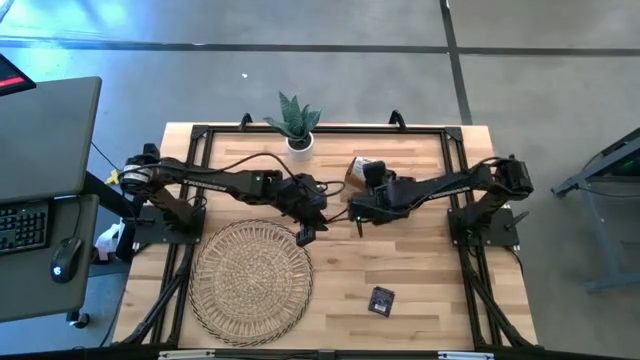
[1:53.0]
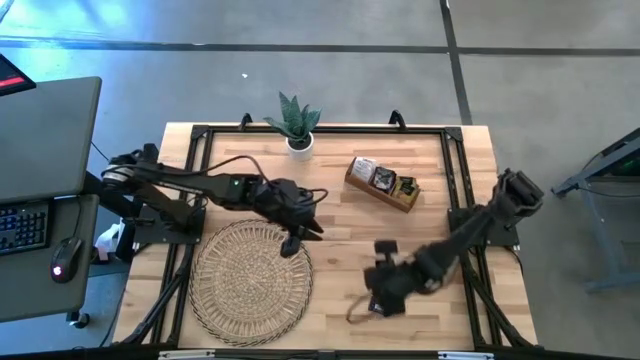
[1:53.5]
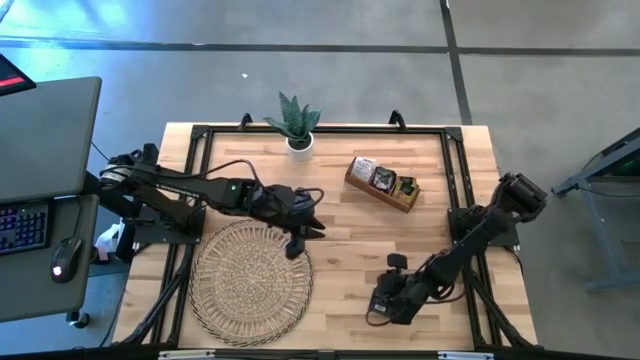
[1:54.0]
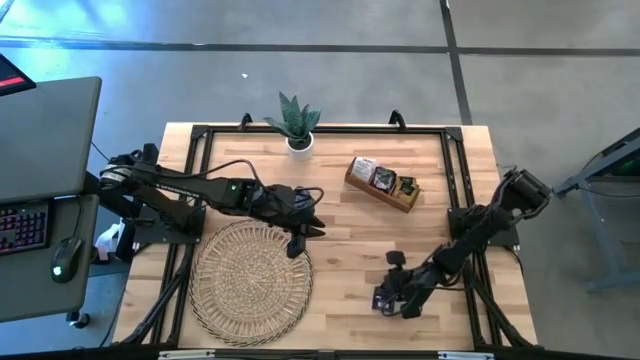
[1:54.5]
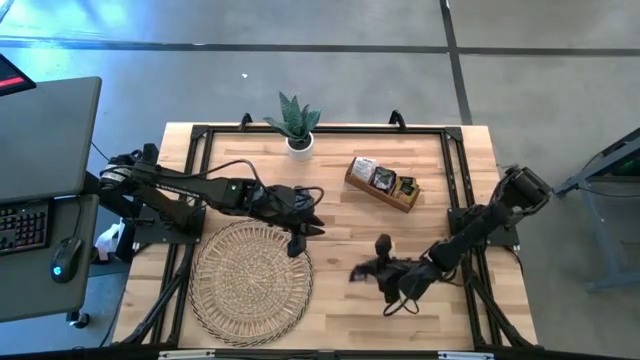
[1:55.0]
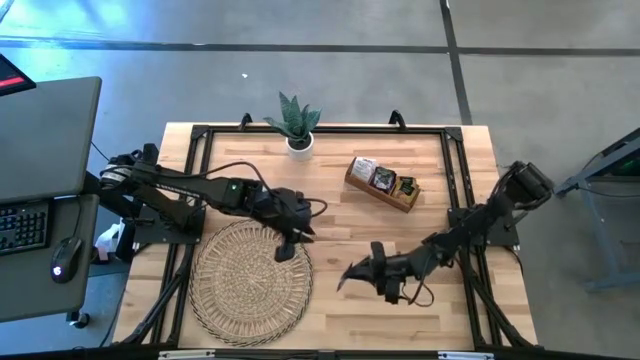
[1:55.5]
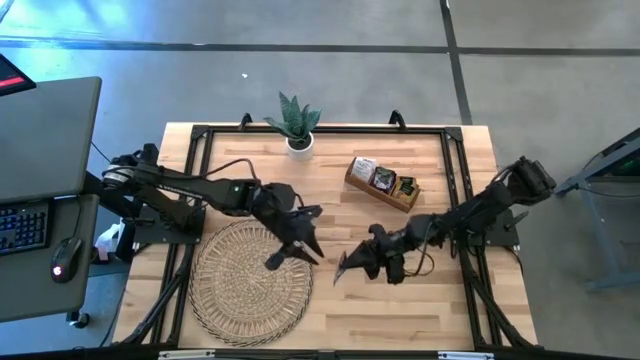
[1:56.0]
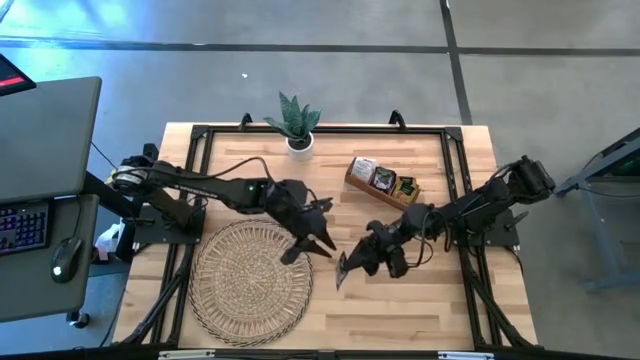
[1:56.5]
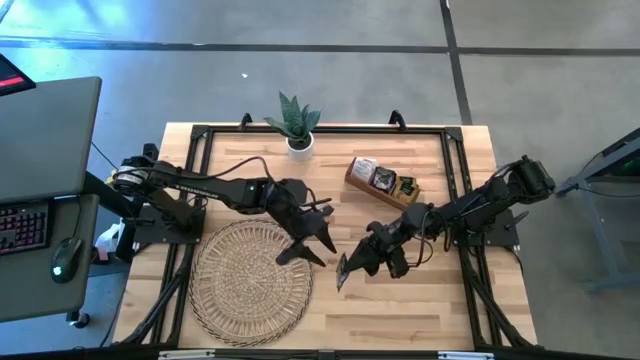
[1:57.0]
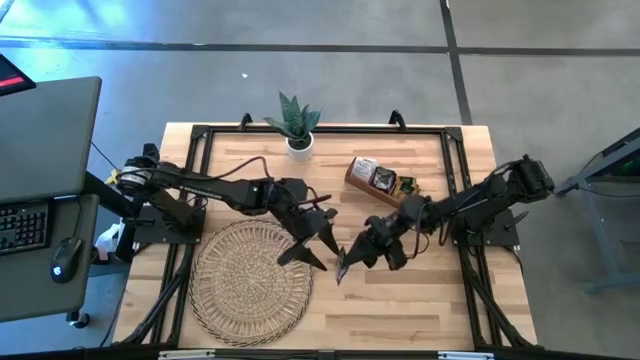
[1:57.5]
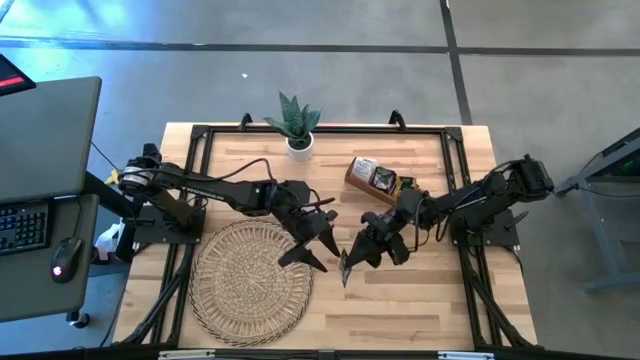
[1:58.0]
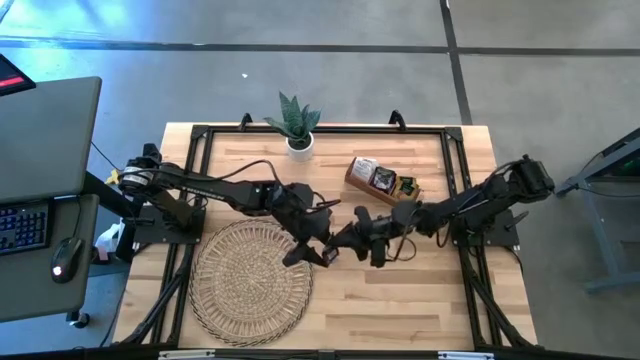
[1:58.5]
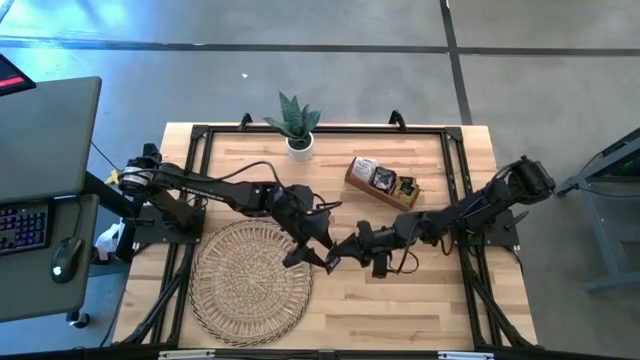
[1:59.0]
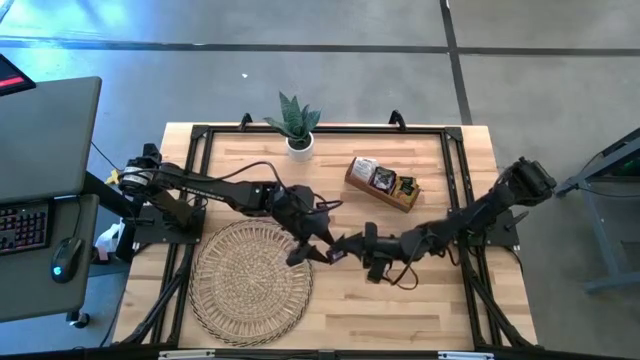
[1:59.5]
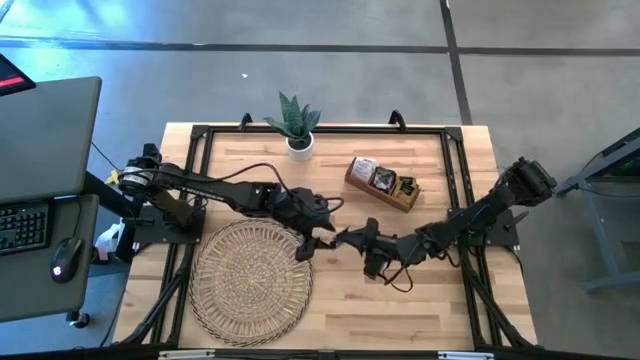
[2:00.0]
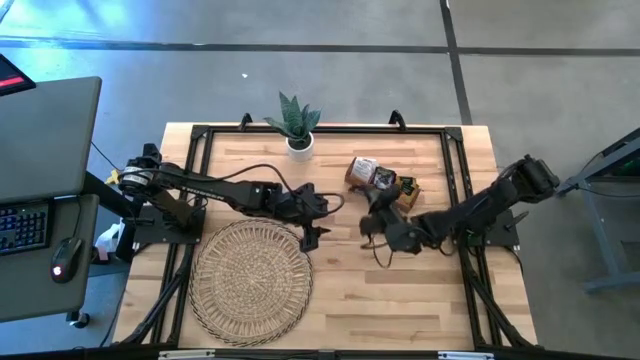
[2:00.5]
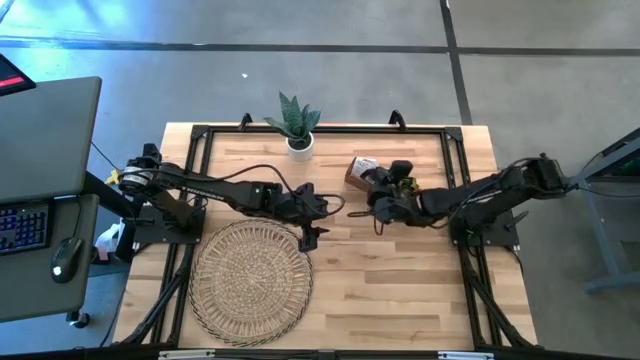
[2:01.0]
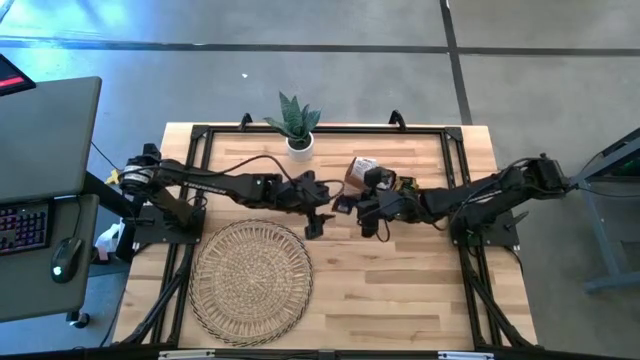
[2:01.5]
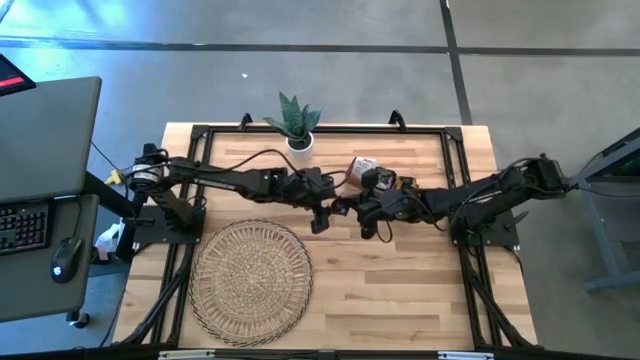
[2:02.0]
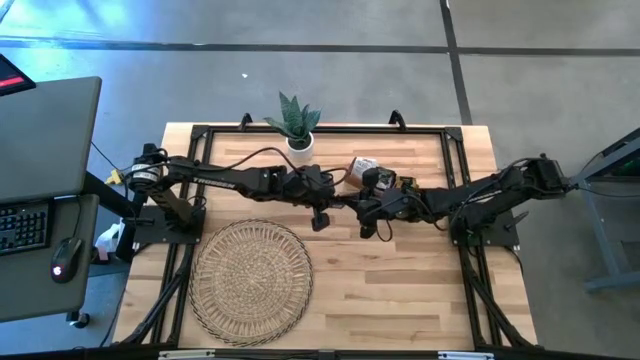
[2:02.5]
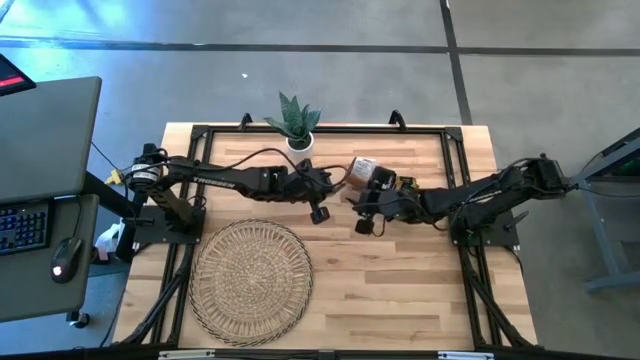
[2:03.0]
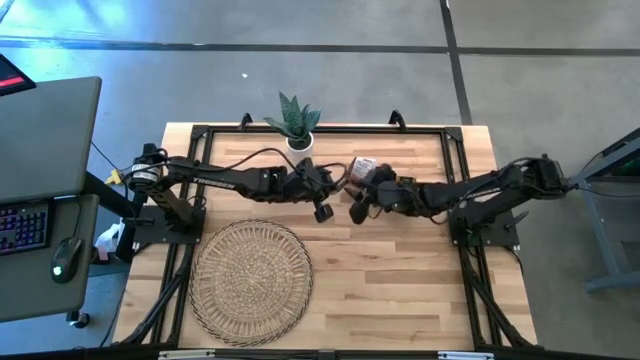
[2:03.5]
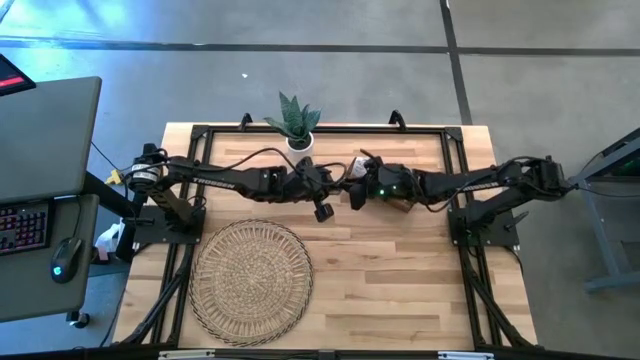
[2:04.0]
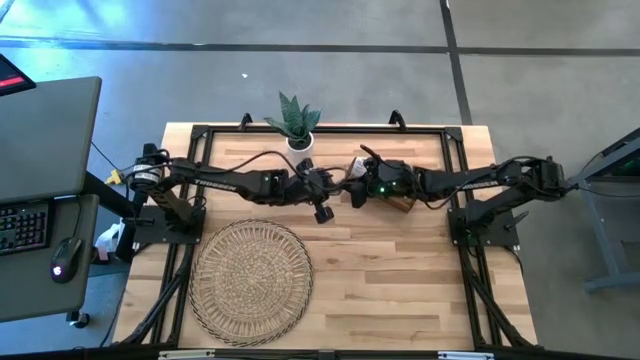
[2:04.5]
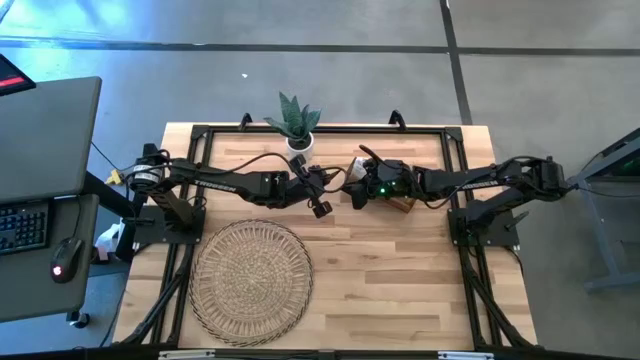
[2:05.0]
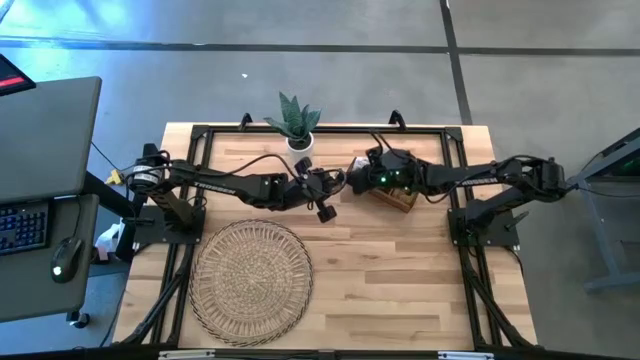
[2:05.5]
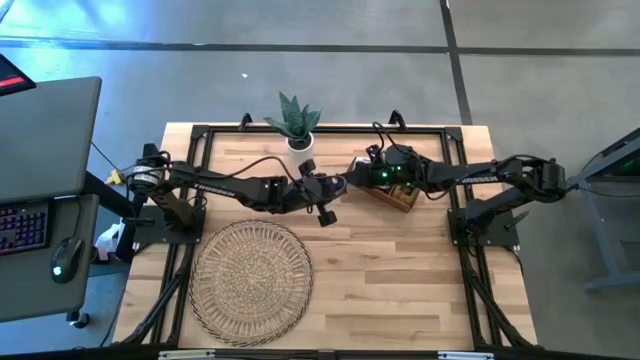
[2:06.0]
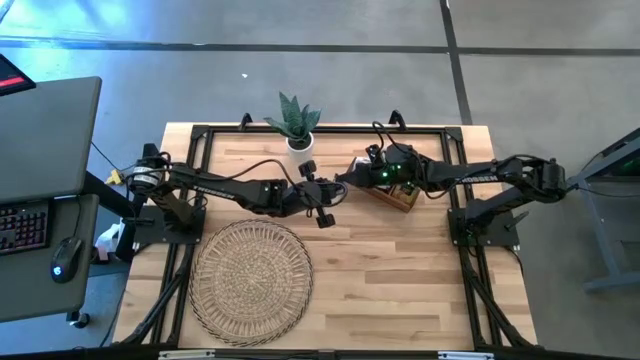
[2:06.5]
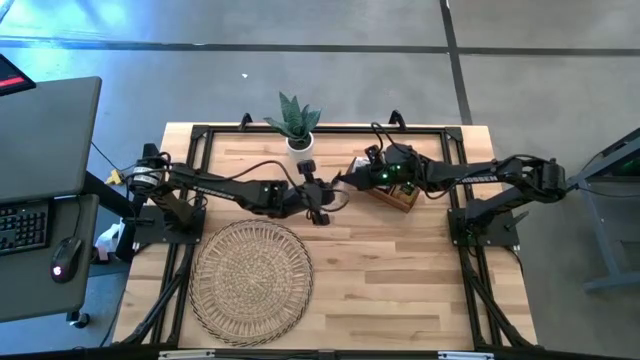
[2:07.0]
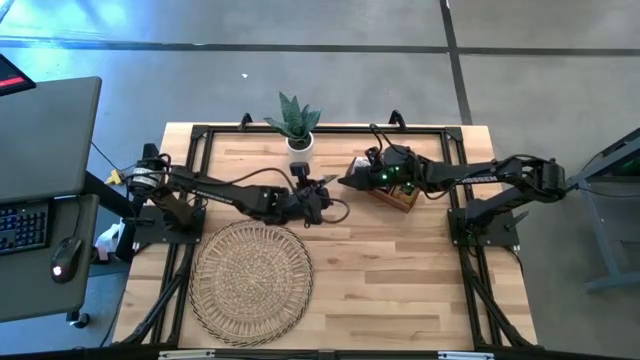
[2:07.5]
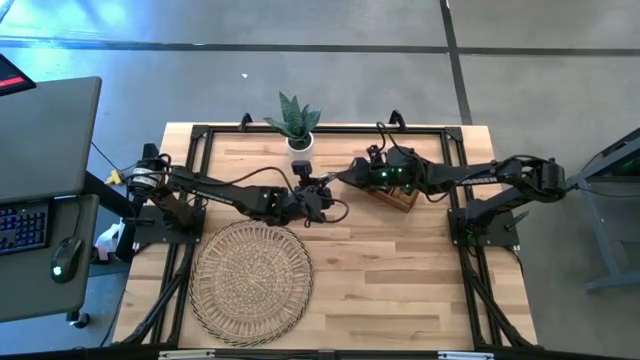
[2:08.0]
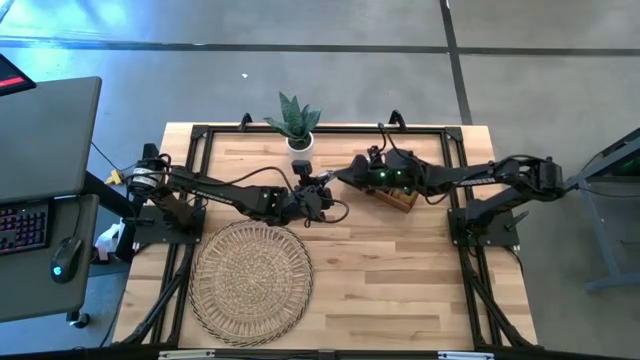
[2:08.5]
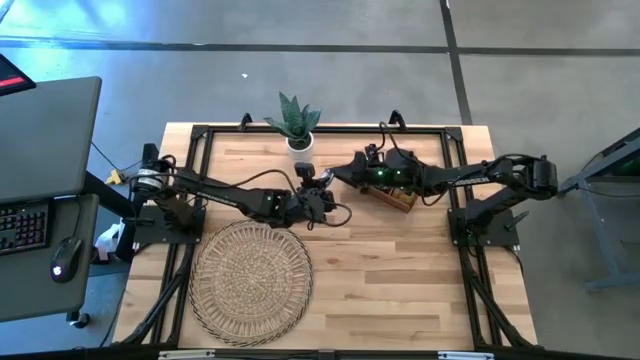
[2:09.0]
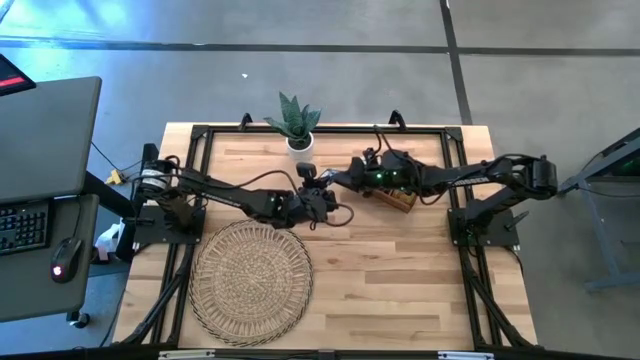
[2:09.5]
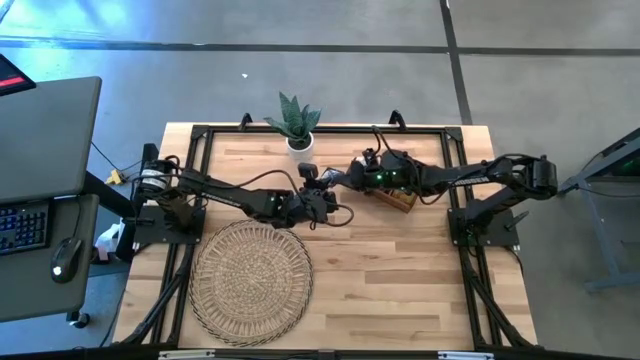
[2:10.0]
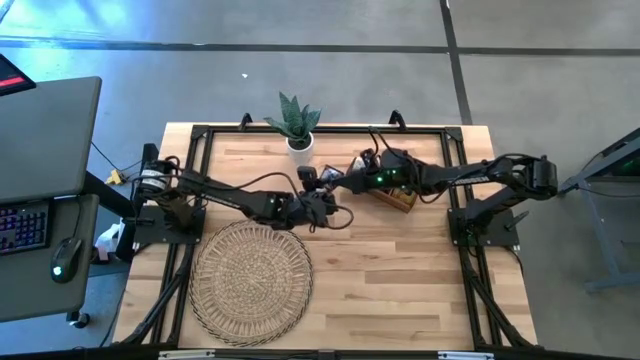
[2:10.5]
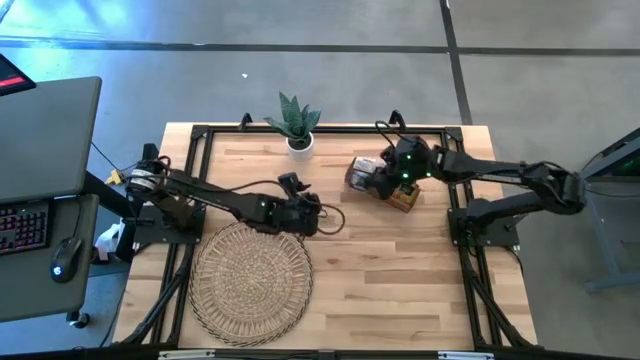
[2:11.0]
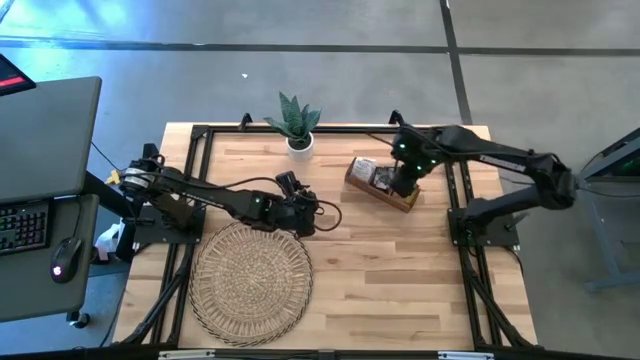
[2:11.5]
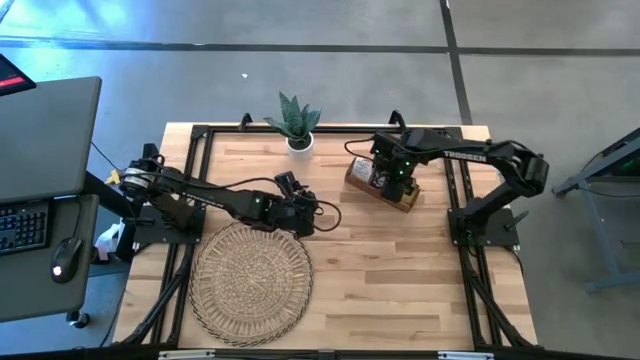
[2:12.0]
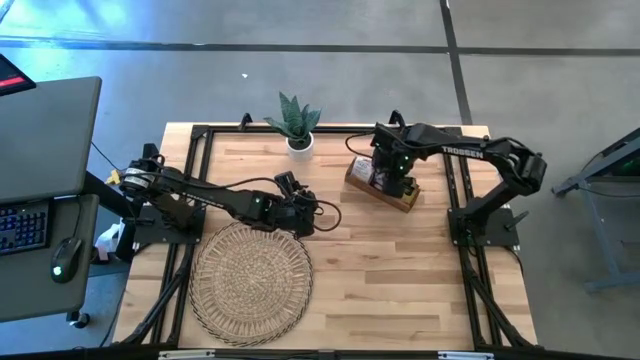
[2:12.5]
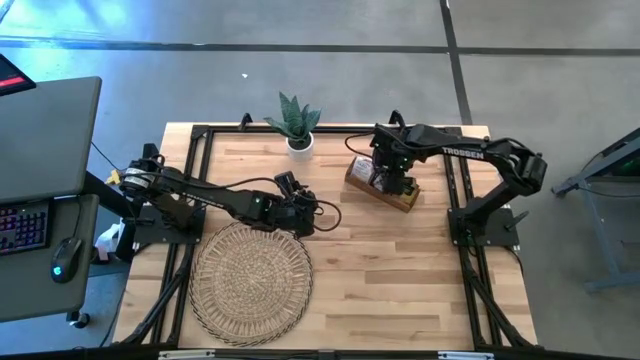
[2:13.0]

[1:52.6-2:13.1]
Task: Pick & Place Tea
Put the black tea bag into the middle section of the wooden organizer
